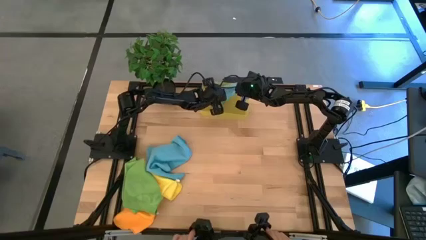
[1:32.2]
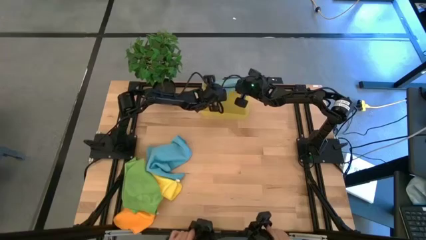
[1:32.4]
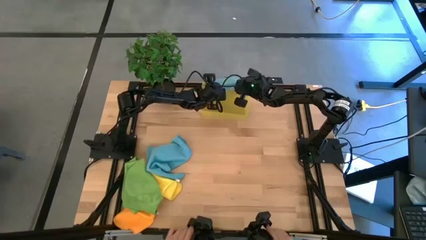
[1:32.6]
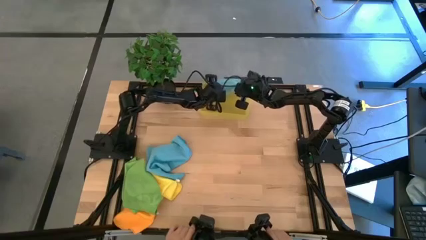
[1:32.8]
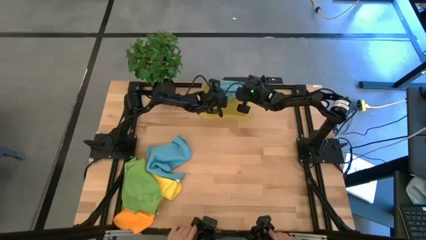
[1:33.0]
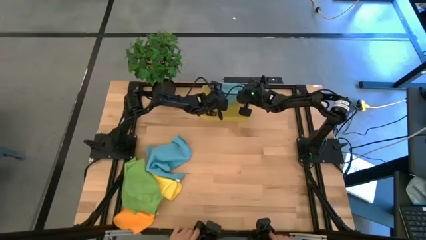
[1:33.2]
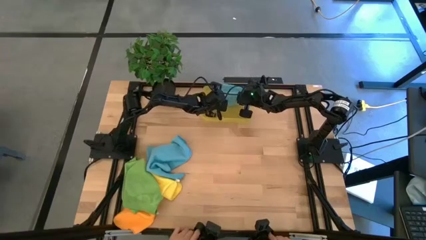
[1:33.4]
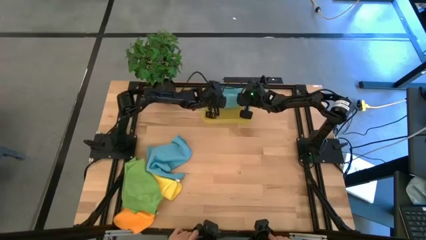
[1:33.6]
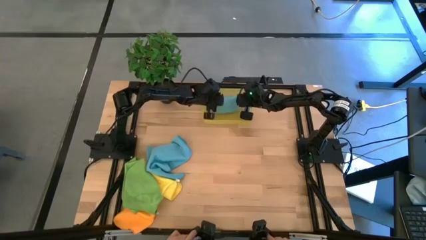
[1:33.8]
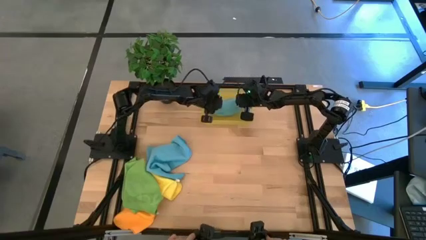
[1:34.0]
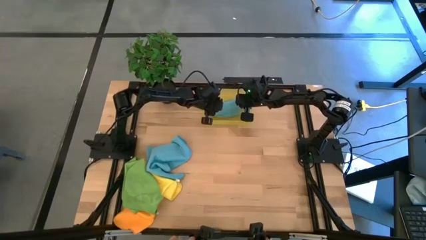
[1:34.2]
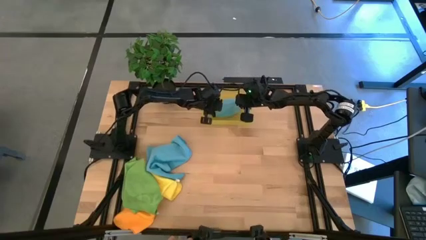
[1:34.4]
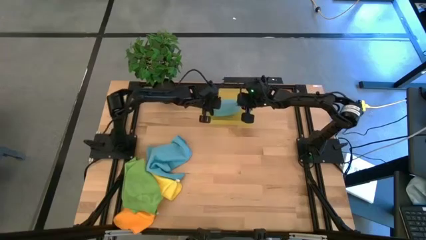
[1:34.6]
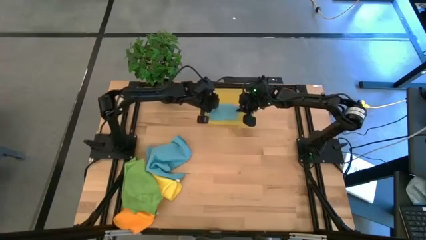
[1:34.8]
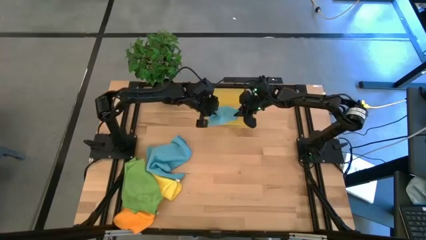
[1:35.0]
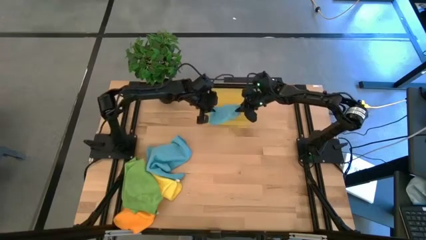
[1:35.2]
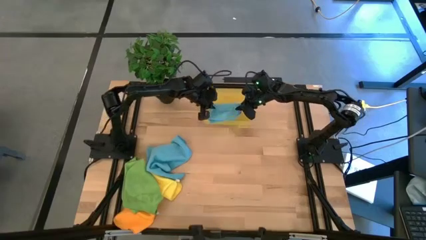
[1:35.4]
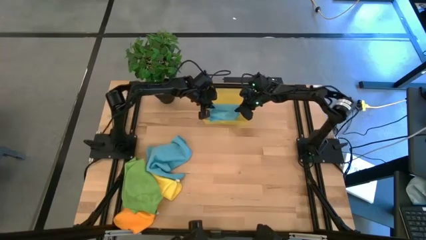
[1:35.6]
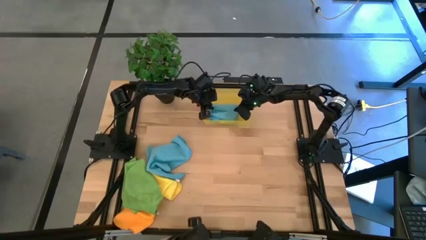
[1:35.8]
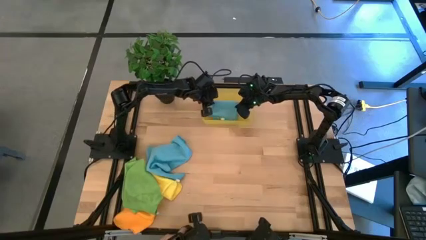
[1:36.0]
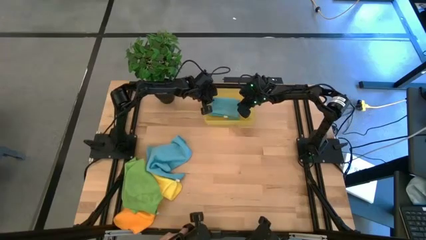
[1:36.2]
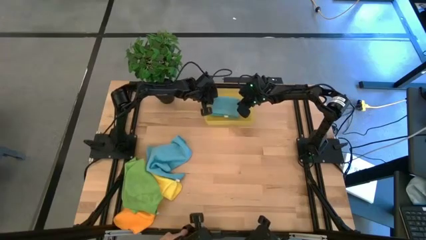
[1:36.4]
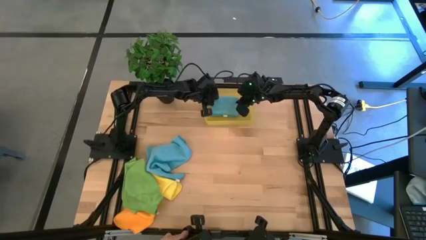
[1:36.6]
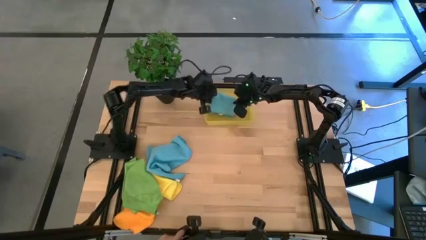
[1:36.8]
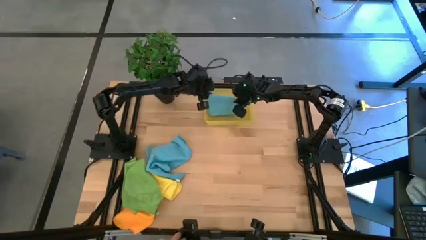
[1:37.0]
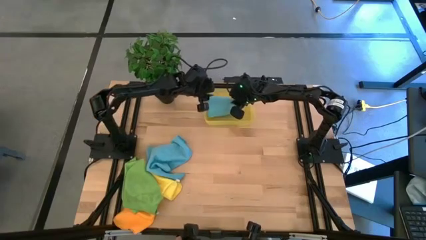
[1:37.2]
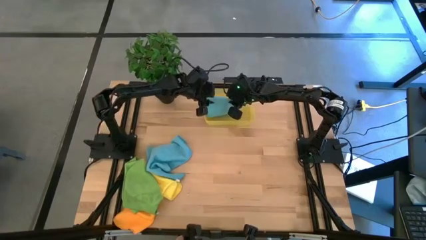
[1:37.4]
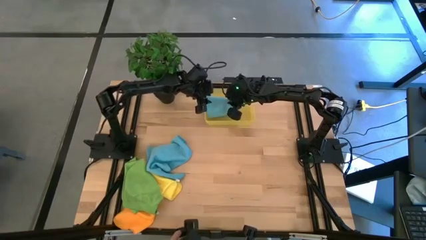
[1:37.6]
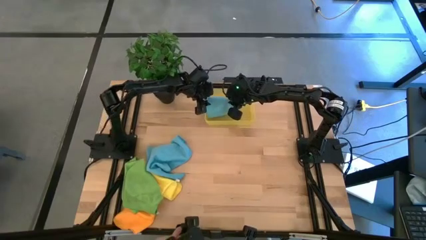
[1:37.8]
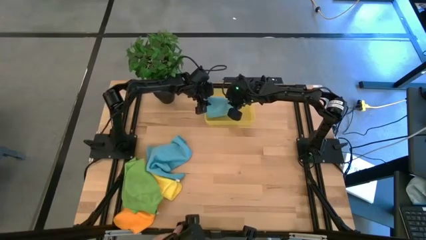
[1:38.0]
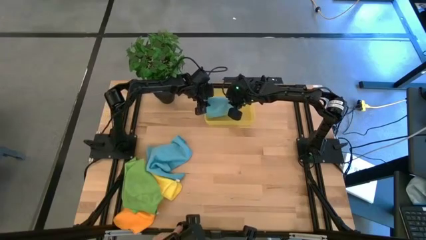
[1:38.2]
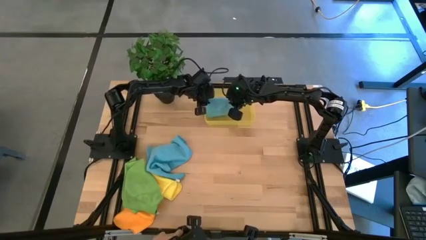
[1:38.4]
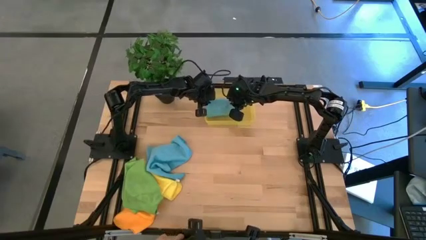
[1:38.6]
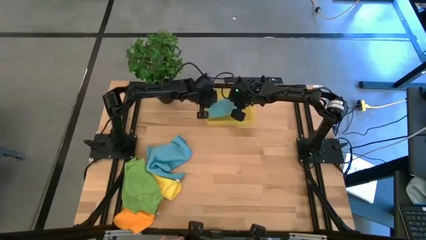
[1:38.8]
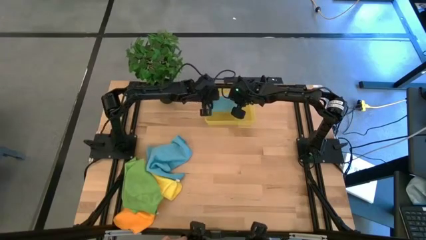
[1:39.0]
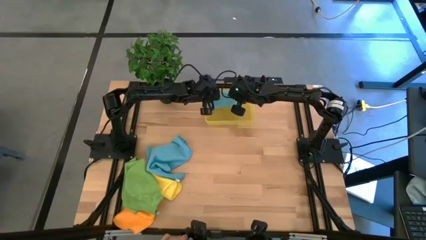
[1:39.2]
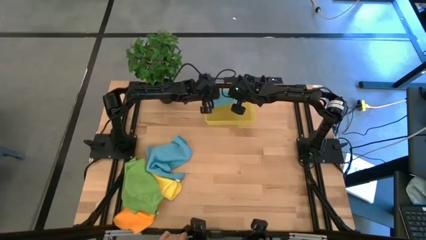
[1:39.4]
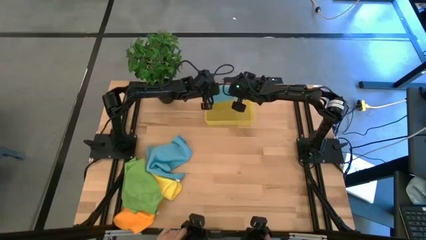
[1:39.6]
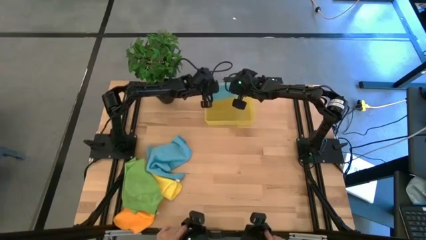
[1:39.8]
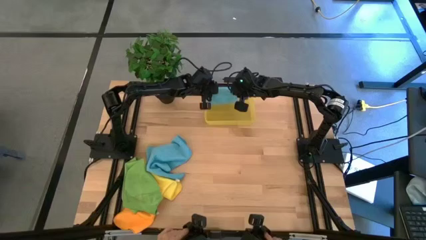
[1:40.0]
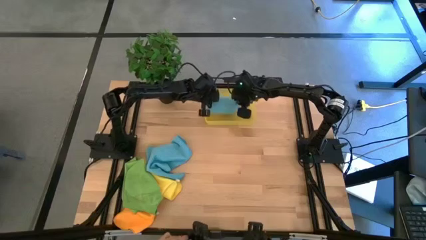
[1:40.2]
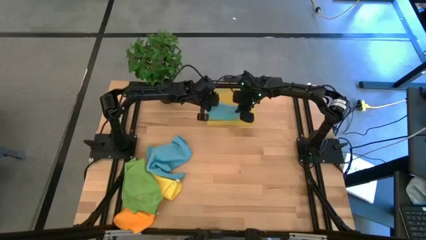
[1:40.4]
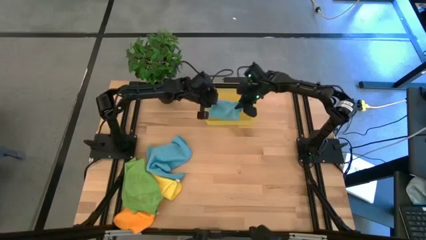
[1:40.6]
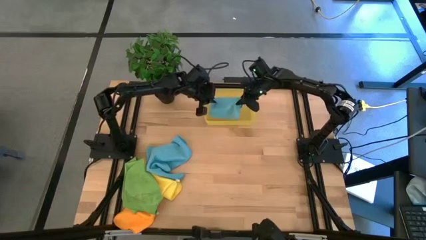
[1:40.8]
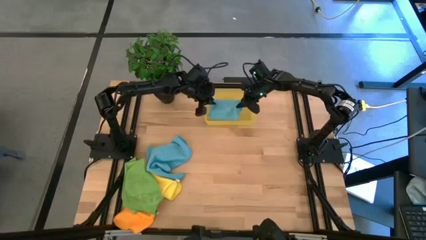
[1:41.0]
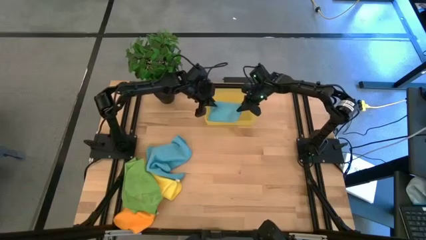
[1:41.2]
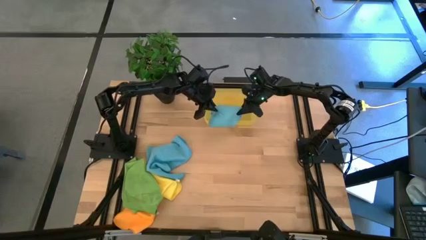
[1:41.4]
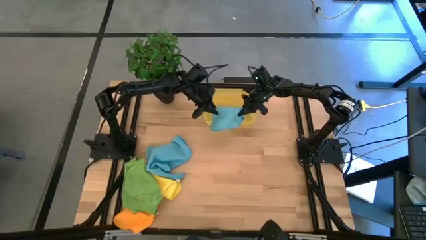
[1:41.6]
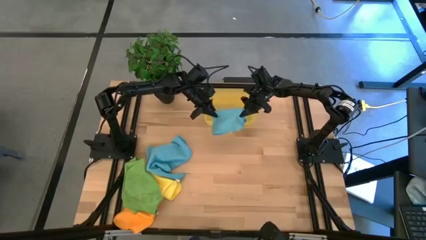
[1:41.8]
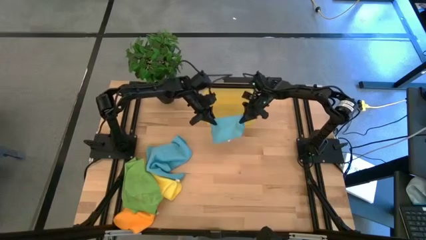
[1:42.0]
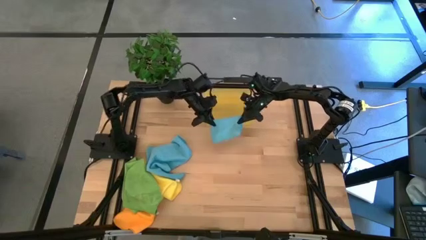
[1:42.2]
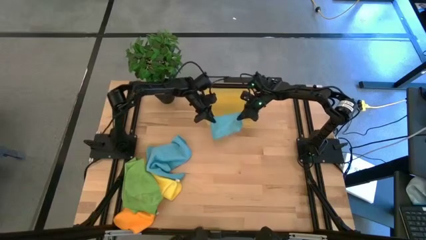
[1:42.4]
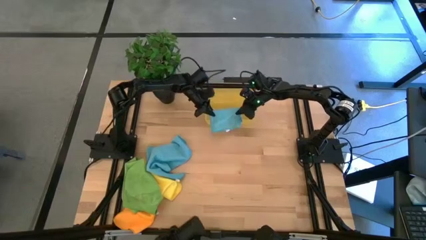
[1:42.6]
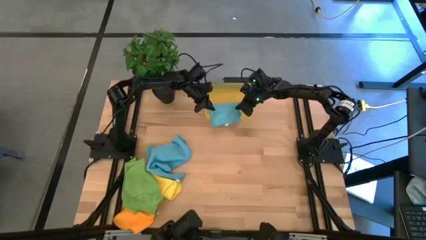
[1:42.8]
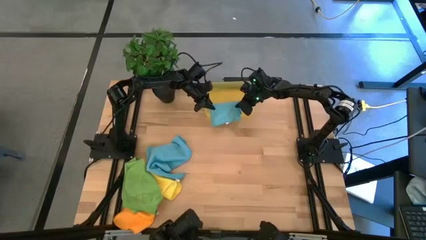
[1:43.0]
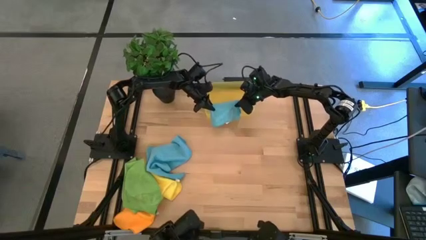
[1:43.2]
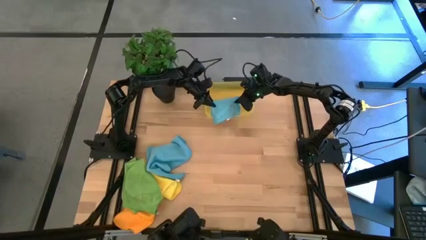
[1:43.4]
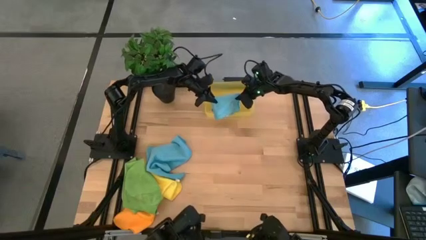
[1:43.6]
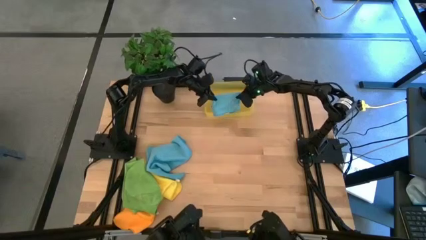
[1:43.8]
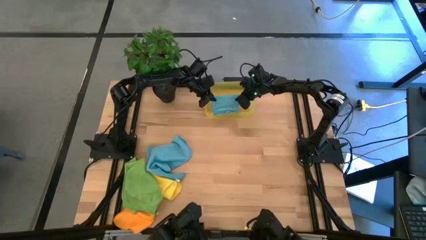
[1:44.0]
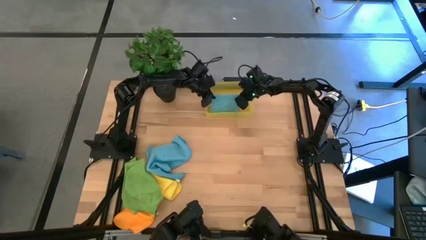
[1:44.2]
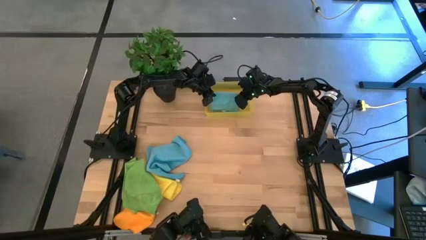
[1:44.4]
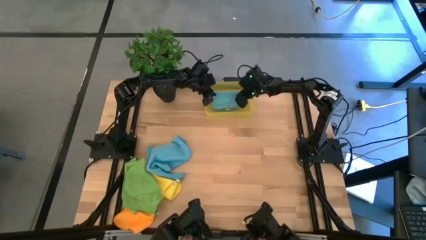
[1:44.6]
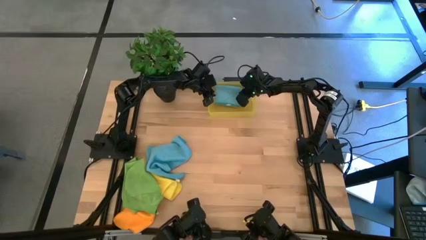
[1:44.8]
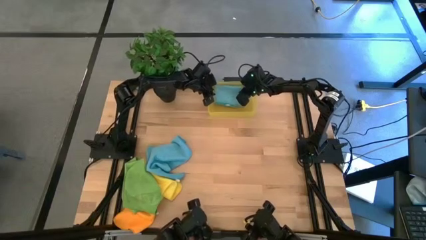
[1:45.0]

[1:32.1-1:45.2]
Task: Fold microfiber towels
Put the folded left blue microfiber towel into the yellow bin
